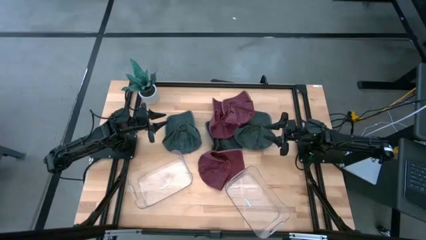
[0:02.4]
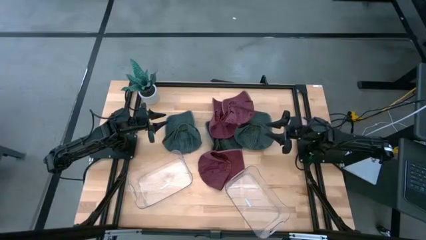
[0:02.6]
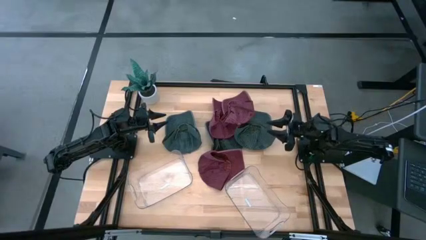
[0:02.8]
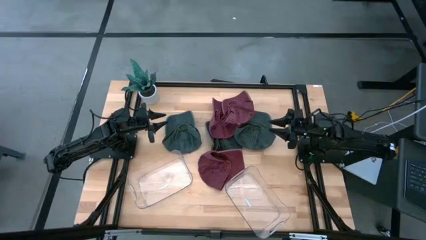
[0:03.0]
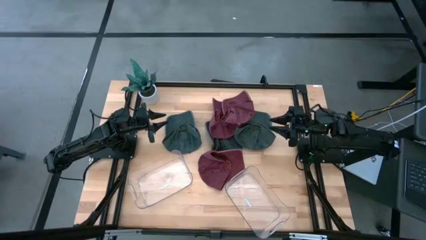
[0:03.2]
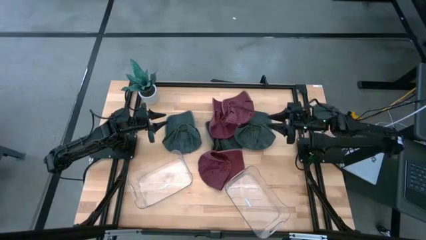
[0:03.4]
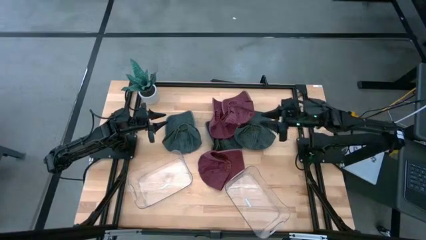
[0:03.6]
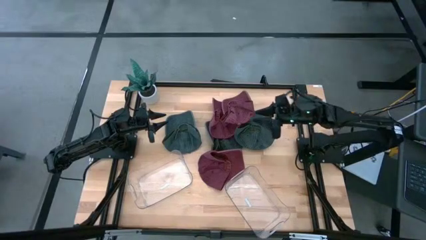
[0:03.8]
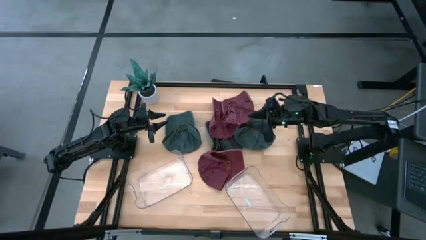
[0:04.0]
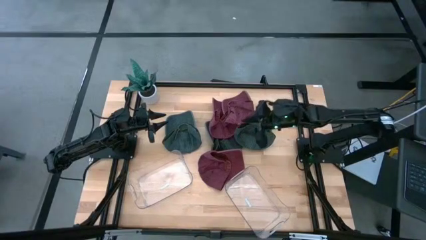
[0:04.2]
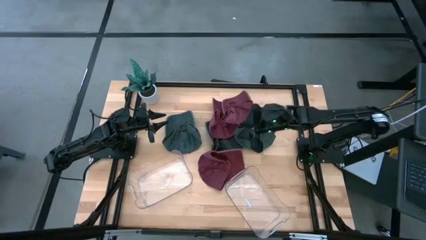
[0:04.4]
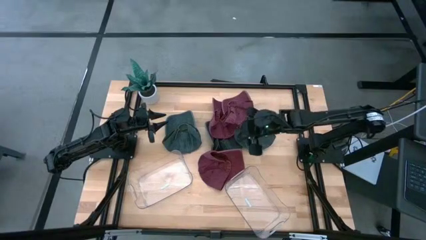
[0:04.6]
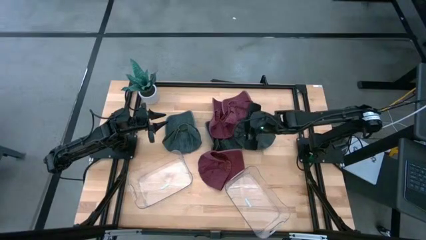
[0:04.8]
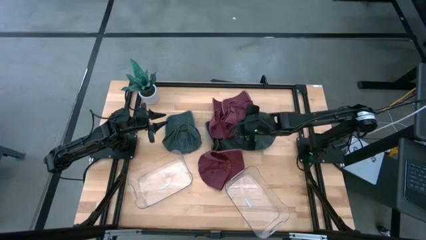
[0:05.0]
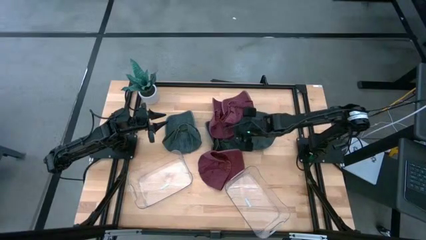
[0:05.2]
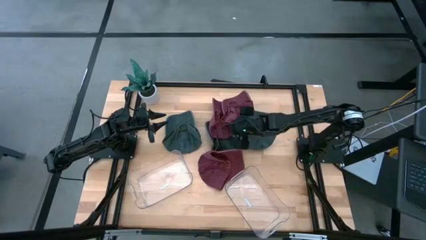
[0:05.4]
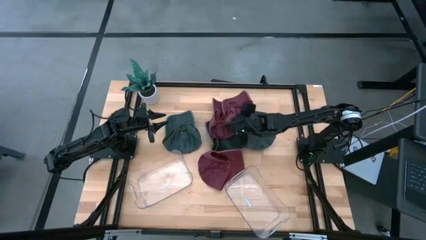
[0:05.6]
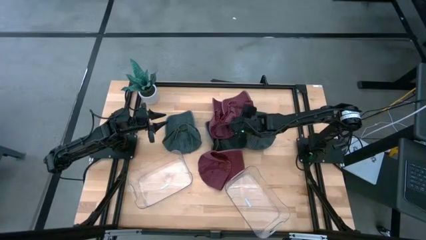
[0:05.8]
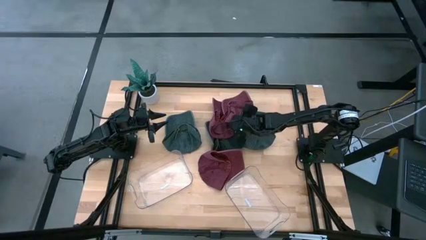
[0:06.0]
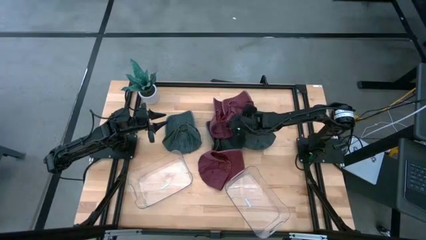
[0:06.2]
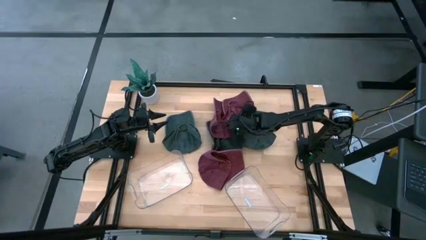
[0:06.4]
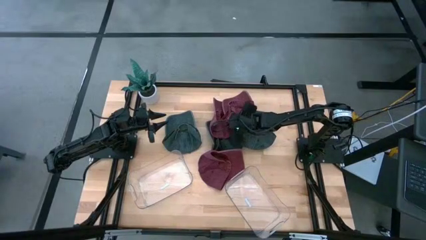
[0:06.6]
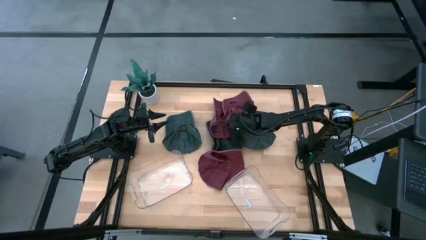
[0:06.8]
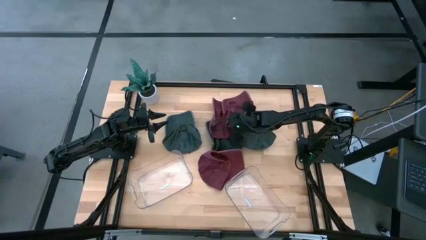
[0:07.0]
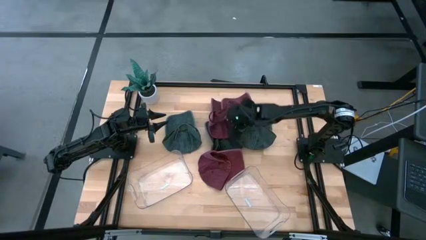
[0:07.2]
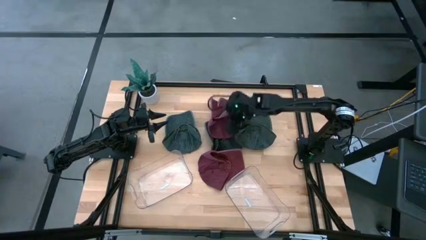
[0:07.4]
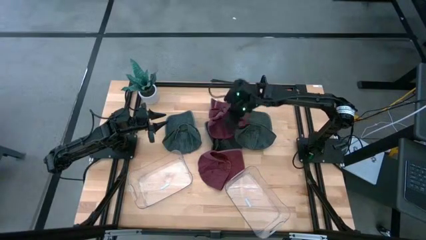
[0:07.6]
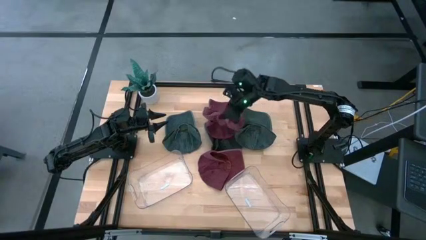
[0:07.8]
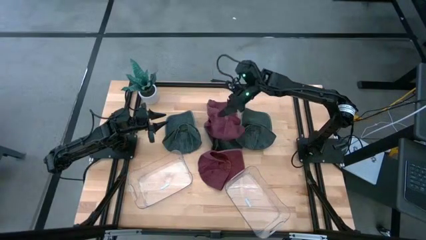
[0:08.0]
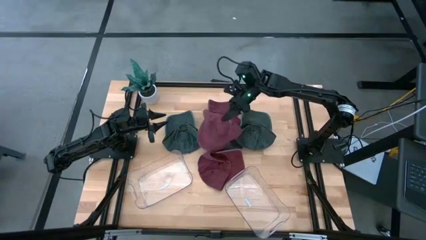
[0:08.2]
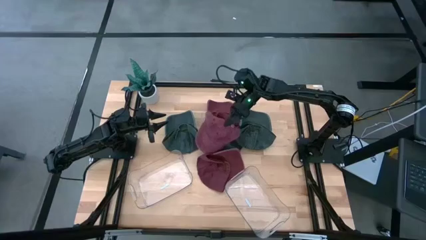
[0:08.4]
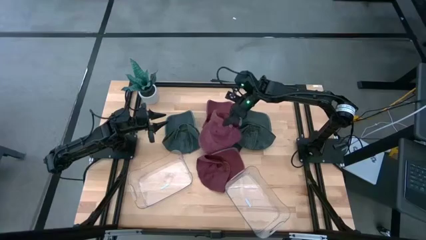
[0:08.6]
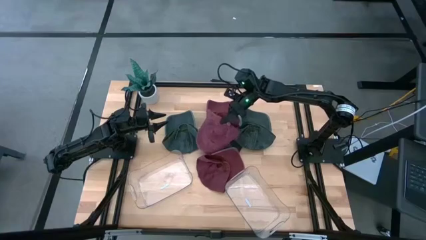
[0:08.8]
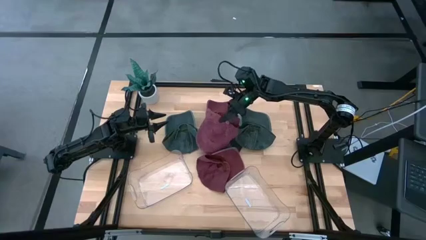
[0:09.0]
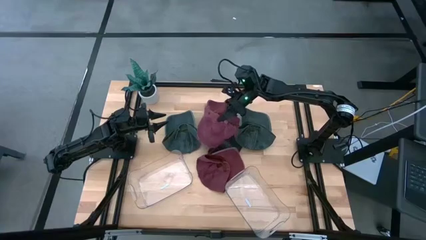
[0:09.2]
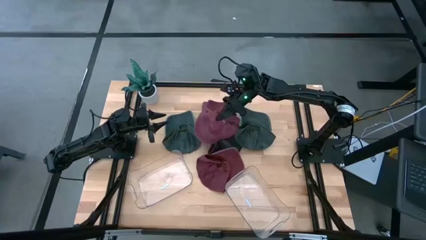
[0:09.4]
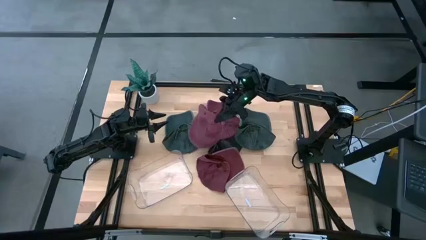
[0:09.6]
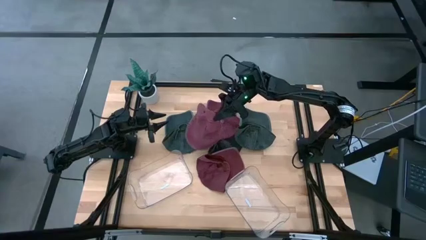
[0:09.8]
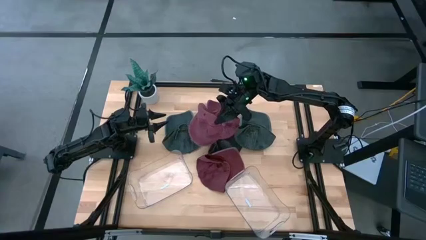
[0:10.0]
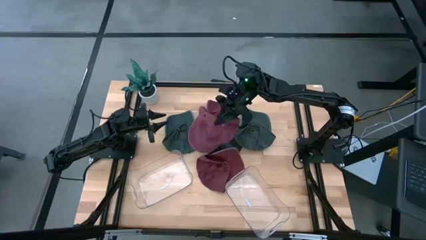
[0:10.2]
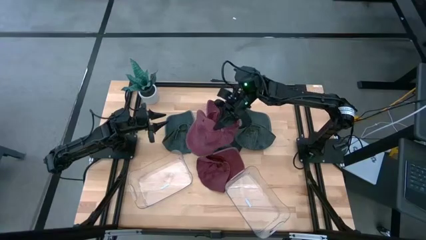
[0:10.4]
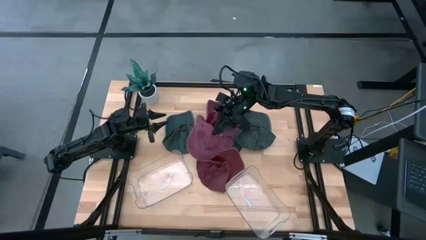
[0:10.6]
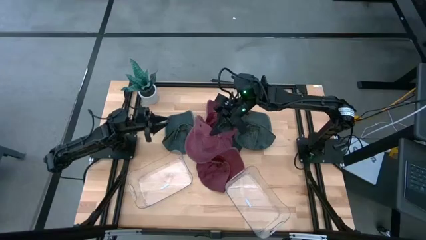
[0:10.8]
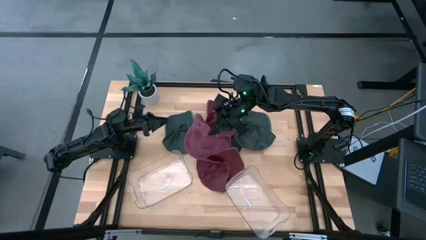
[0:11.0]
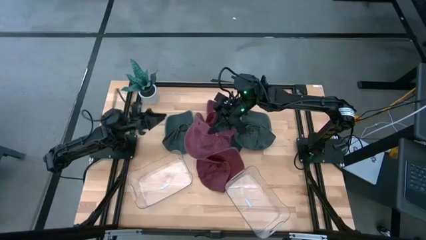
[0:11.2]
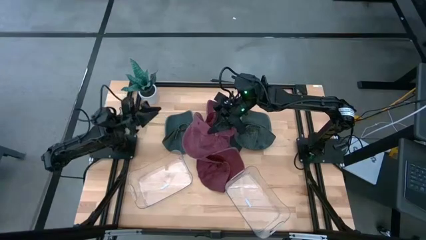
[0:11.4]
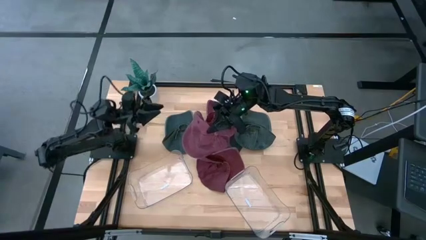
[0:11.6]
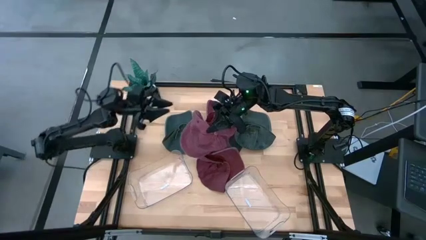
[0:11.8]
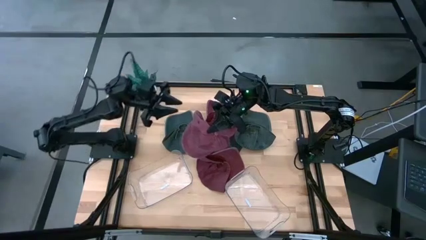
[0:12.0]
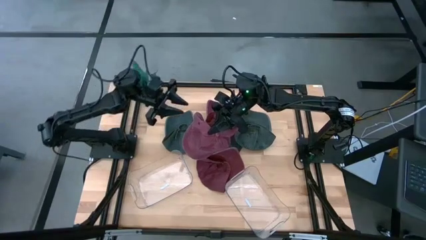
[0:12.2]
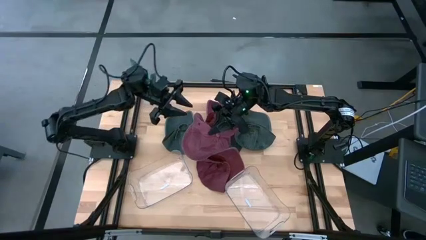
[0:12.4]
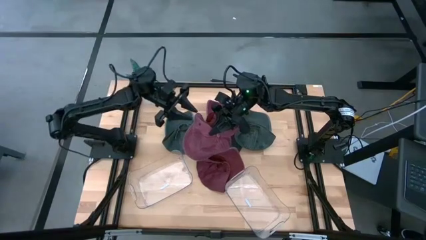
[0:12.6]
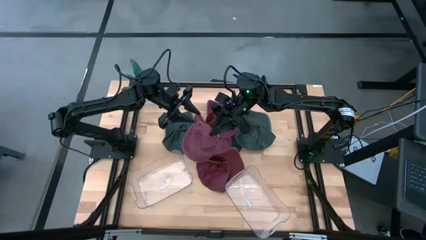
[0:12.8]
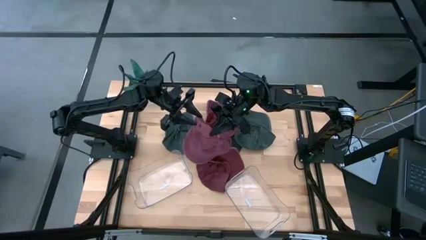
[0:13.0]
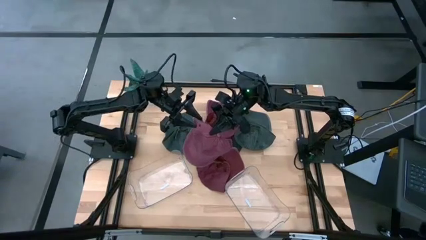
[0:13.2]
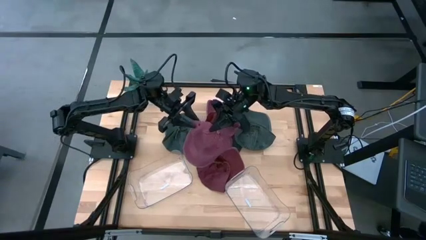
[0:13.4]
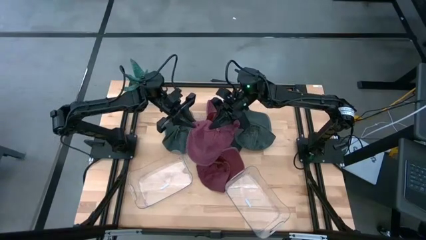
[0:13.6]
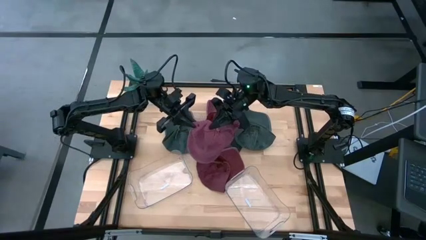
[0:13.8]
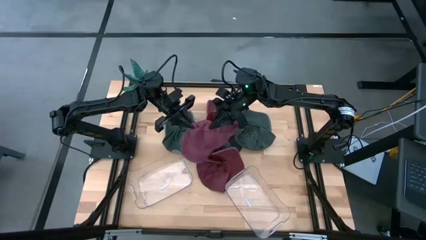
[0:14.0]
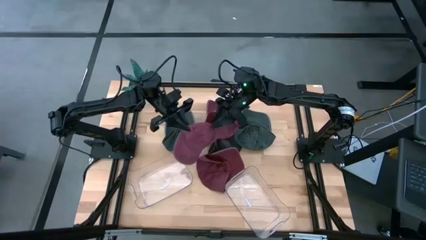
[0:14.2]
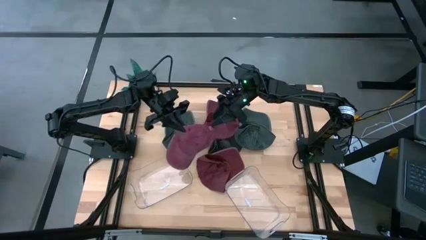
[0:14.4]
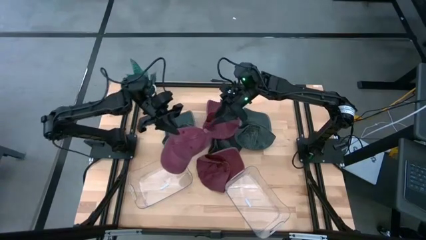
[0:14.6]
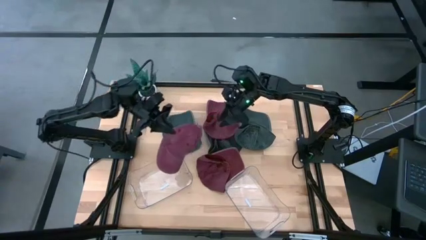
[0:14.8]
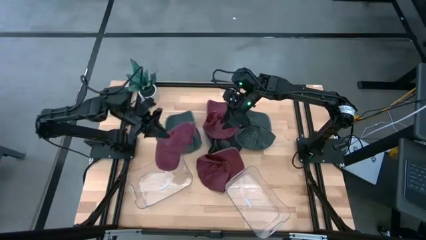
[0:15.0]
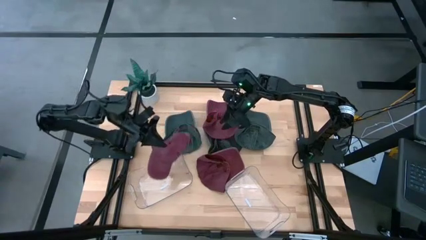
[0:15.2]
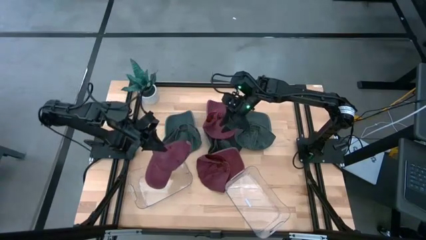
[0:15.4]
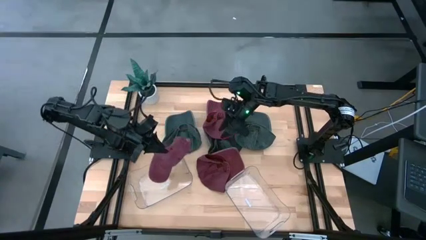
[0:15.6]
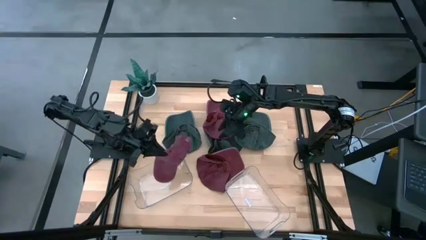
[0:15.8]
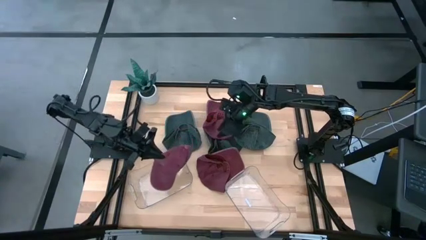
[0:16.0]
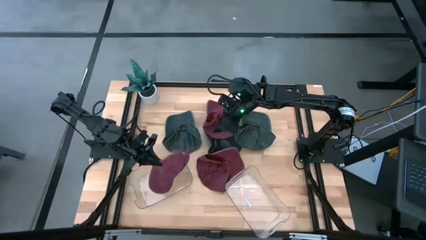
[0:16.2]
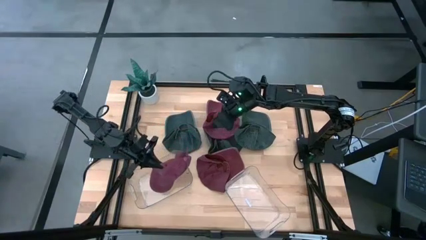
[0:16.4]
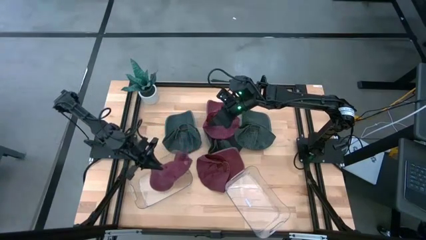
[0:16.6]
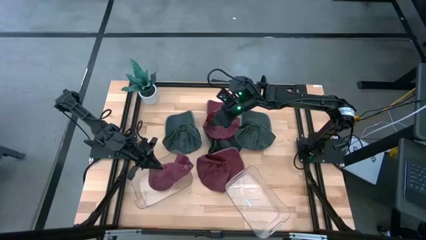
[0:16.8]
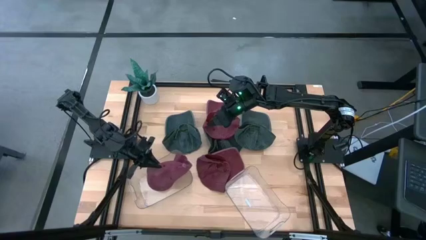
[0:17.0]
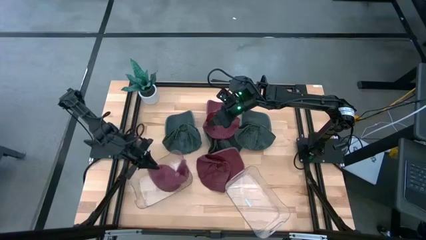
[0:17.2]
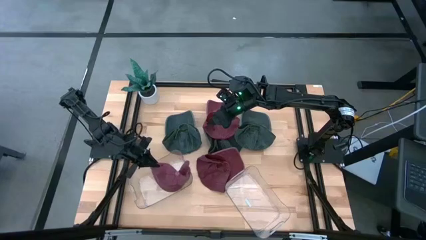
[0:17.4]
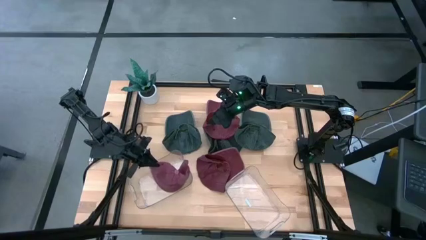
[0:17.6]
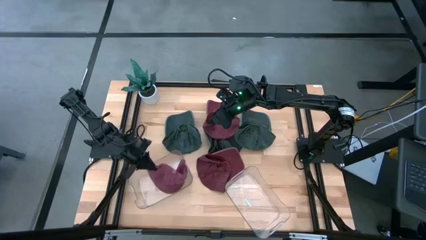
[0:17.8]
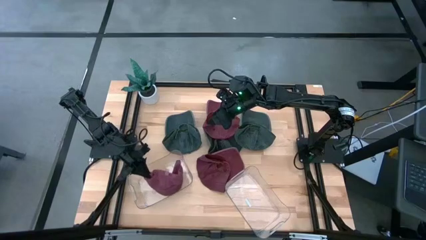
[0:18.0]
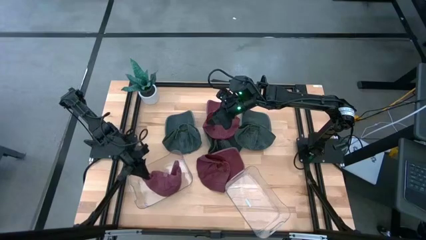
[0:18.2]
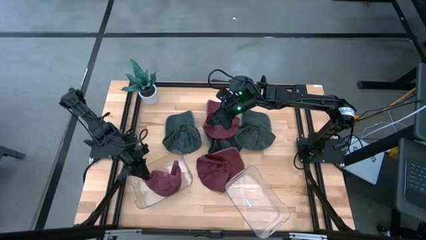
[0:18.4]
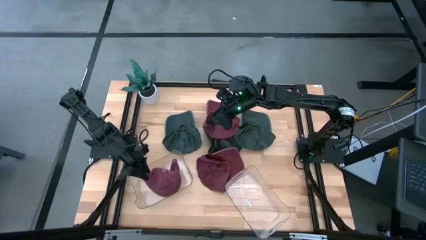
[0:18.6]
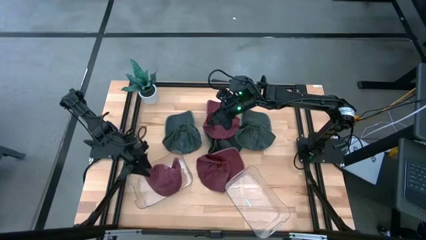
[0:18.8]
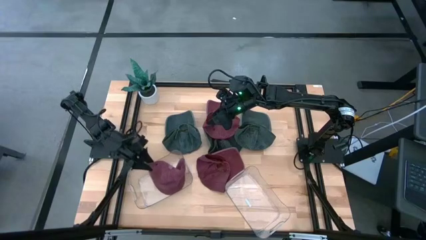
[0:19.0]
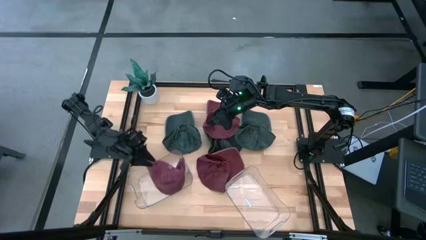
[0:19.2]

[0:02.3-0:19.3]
Task: Pick & Place hat
Put the top red cap into the left transparent bin
